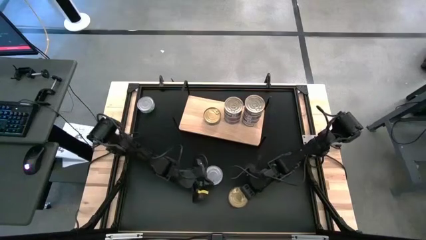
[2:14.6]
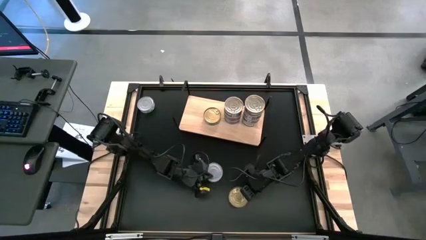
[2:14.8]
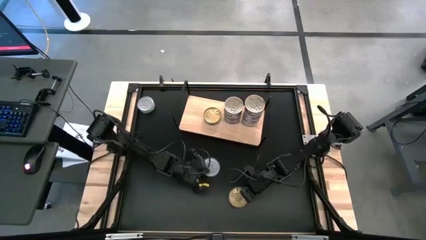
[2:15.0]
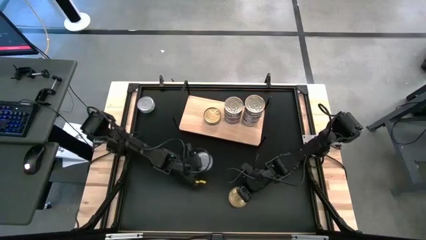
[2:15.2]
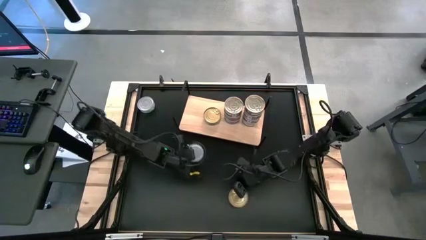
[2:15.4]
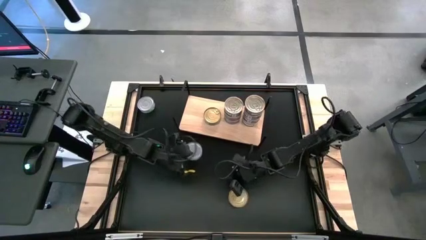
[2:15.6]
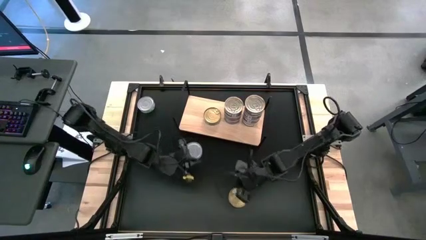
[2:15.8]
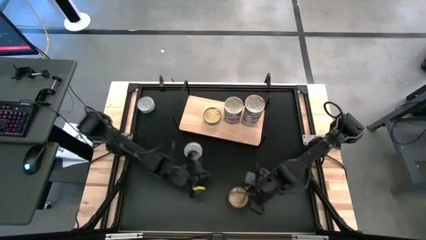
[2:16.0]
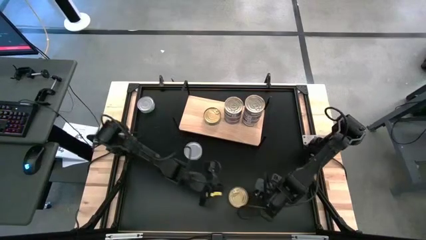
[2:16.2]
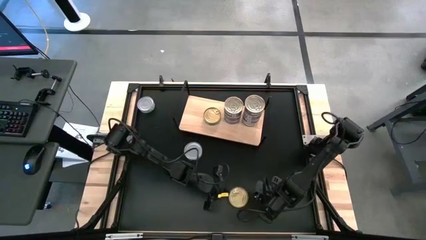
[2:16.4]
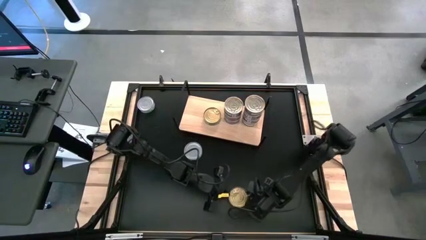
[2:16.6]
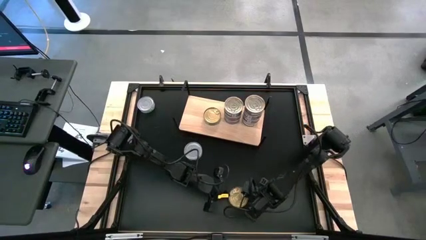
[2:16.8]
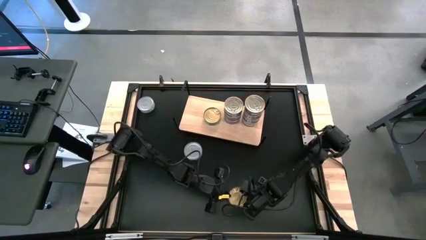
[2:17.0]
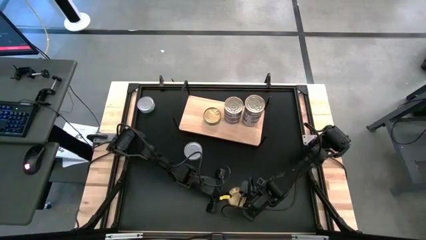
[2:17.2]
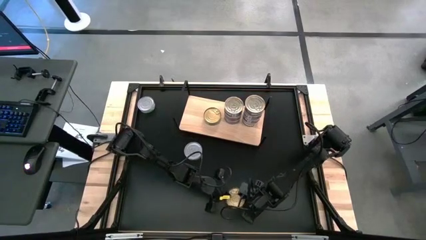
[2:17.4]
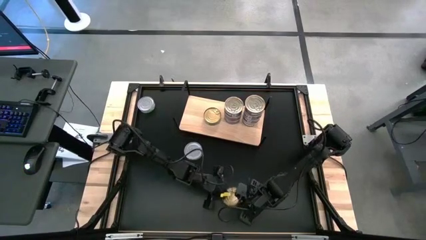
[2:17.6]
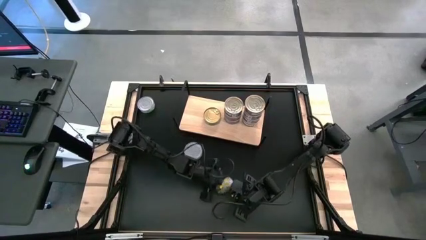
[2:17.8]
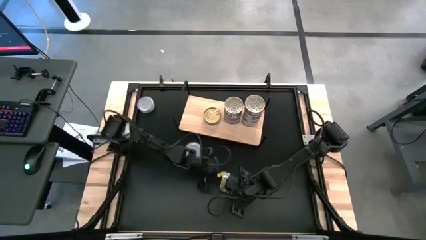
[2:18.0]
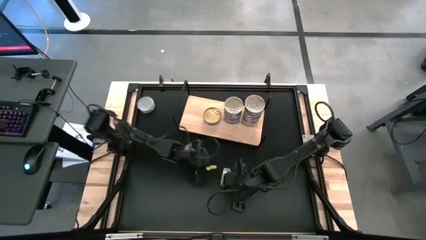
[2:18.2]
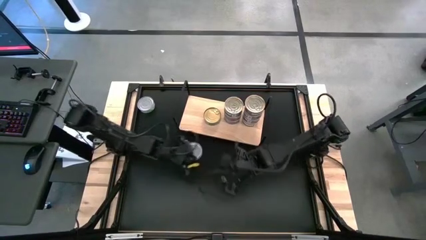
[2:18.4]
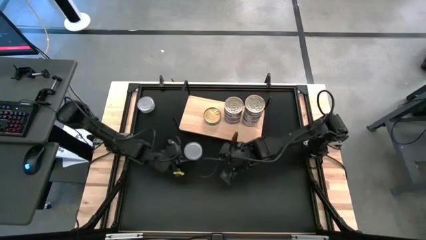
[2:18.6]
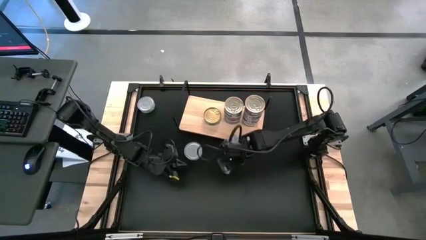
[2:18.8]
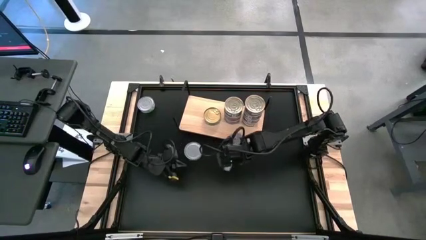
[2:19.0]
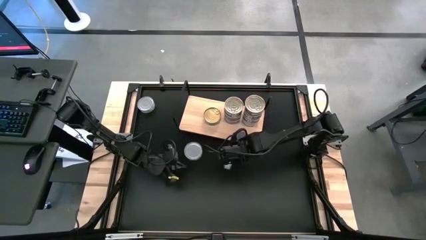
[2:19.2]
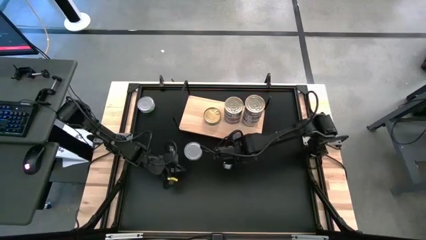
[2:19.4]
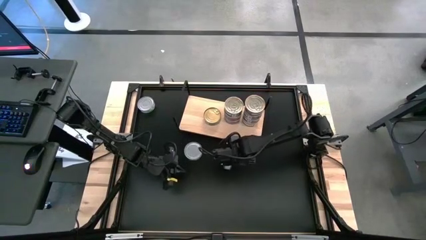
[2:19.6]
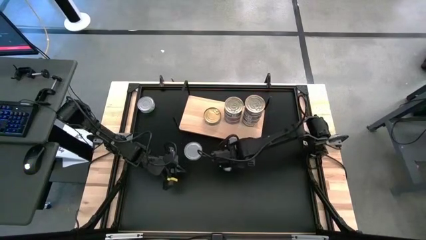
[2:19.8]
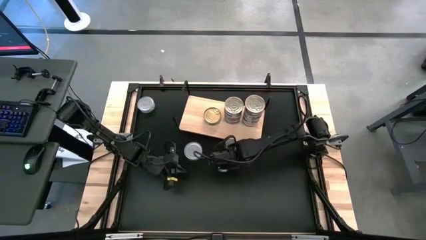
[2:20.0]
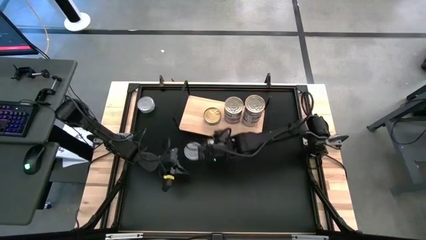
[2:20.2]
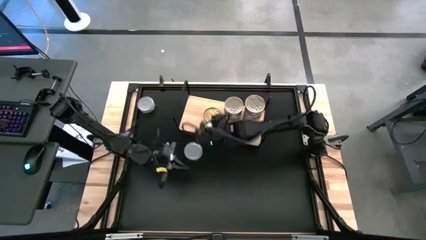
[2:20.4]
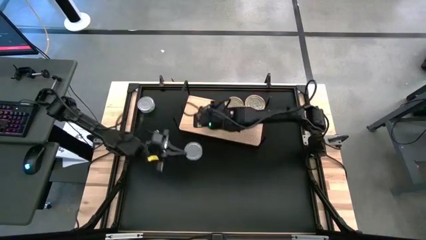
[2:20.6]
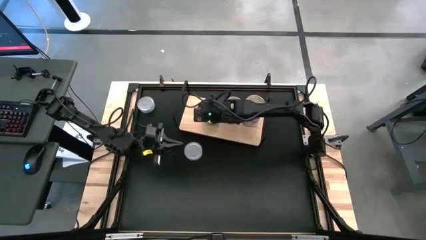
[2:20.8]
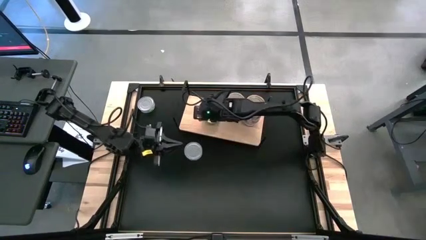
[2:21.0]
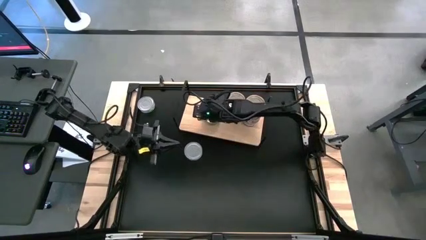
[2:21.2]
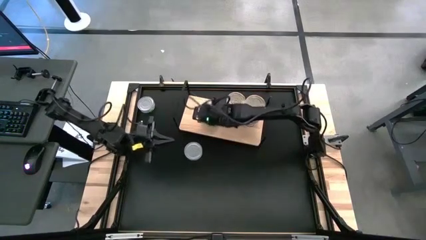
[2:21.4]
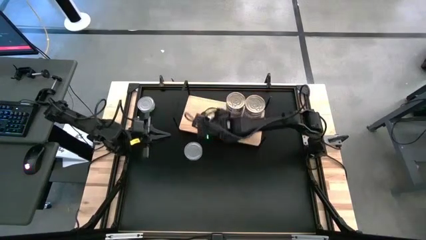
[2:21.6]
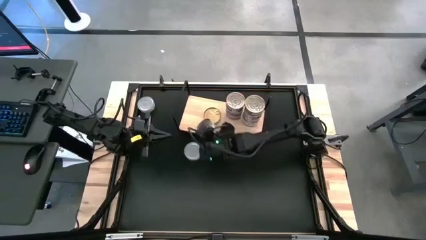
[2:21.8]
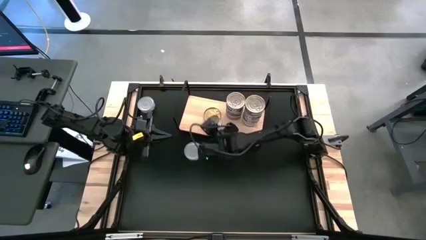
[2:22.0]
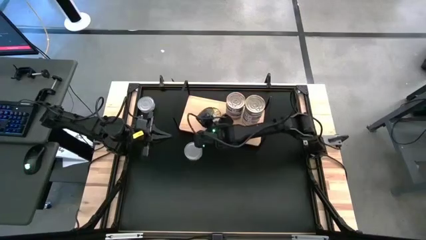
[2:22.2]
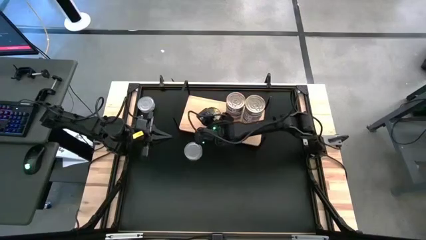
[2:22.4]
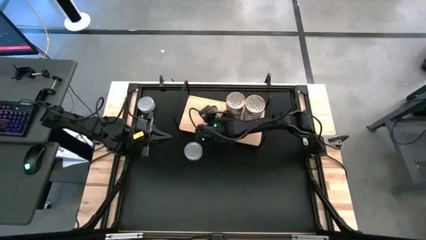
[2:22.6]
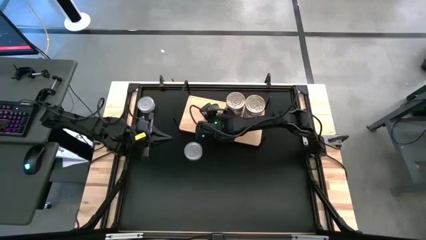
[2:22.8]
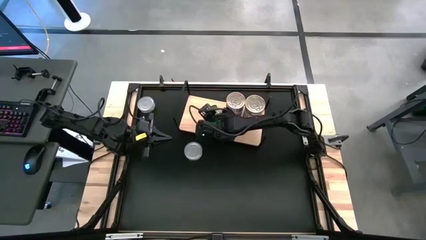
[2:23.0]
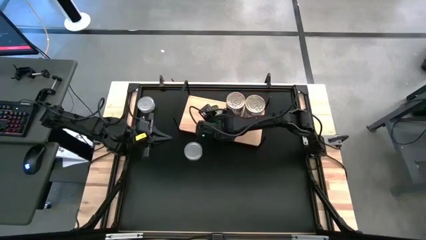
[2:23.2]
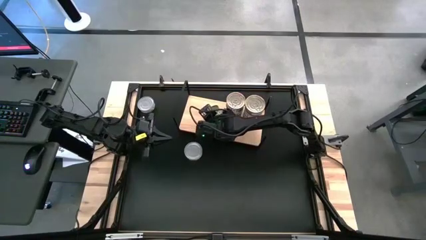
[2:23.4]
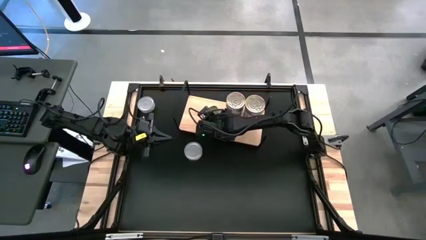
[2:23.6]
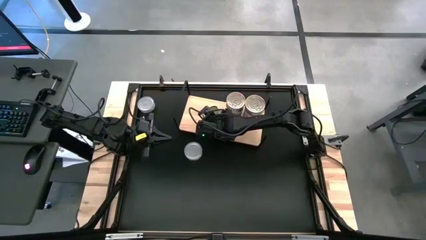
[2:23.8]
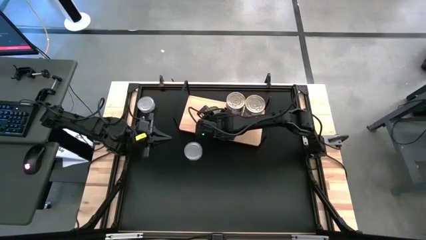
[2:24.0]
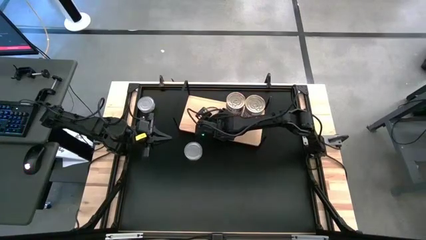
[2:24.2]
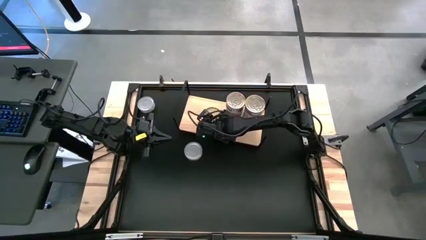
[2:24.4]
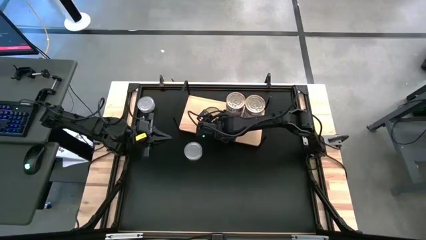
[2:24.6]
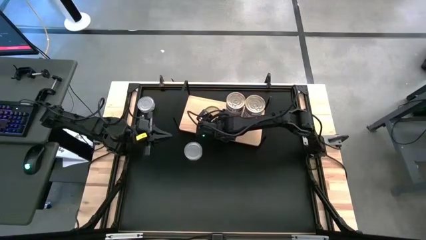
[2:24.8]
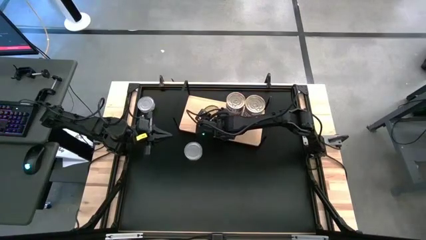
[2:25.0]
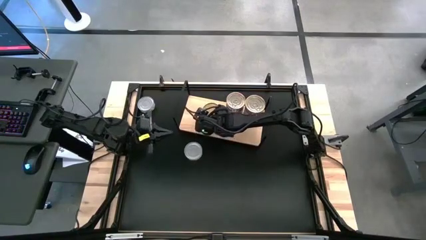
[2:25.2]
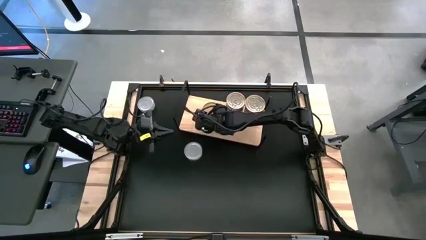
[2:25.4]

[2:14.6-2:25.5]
Task: Stack canned seafood by type on shelf
Stack the green tuna can on top of the other green tuna can on the shelf

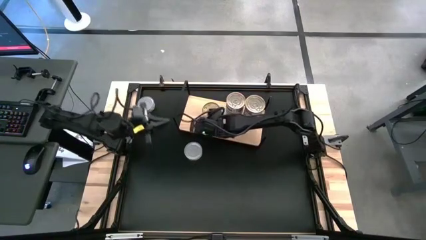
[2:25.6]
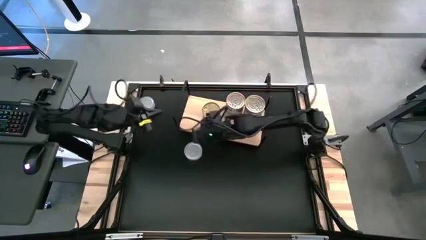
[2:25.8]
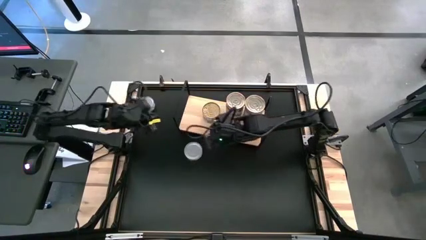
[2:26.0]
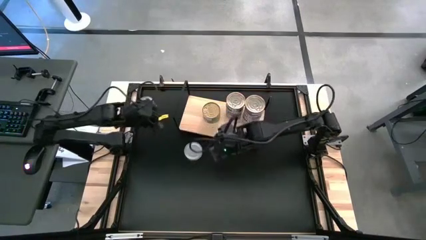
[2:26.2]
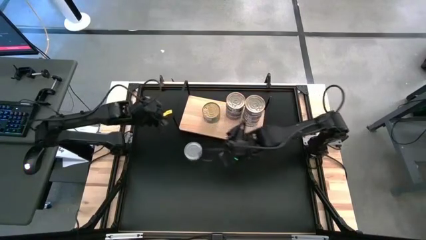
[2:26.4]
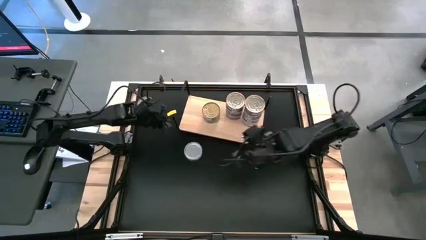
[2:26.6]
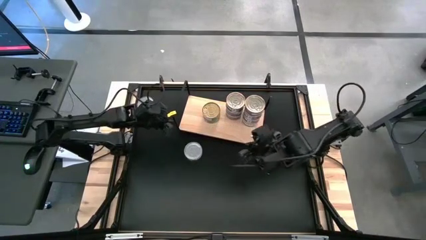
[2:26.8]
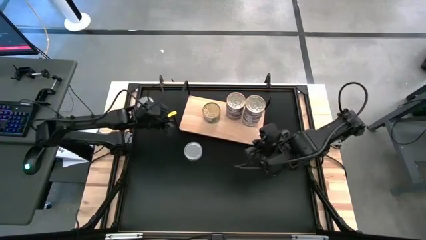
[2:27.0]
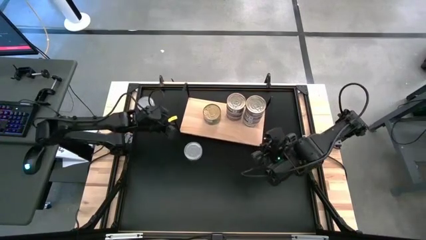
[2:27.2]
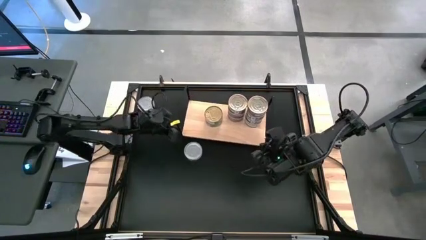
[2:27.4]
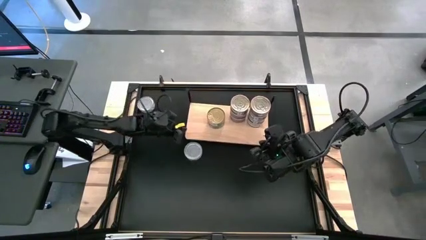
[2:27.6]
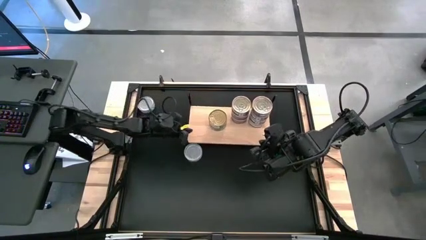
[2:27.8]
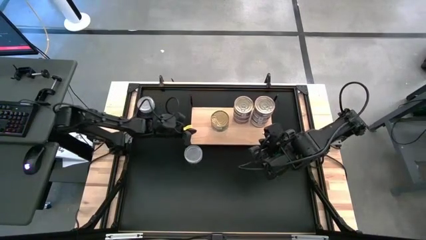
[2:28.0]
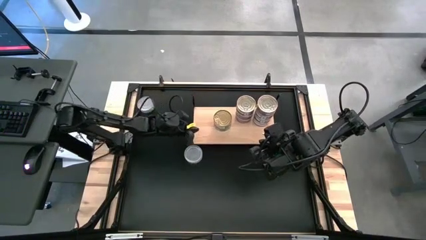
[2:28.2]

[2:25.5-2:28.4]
Adjust the shelf

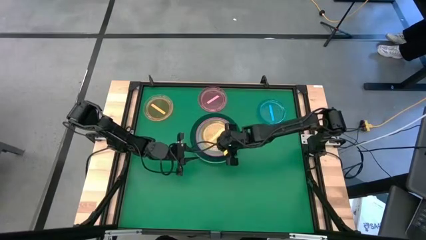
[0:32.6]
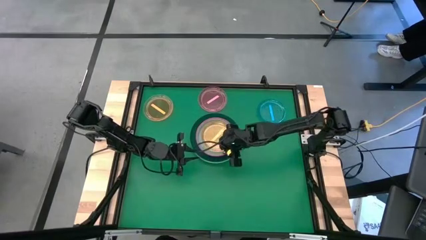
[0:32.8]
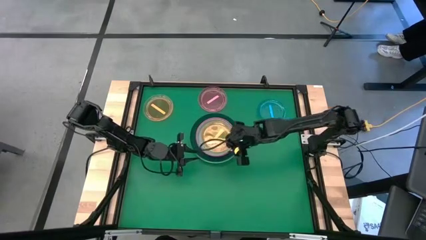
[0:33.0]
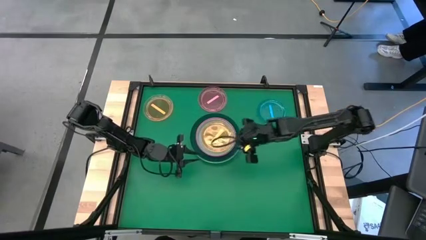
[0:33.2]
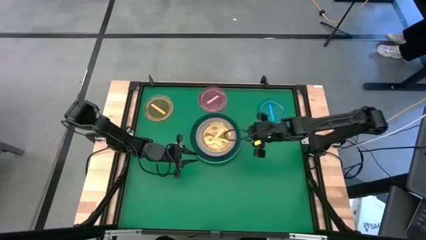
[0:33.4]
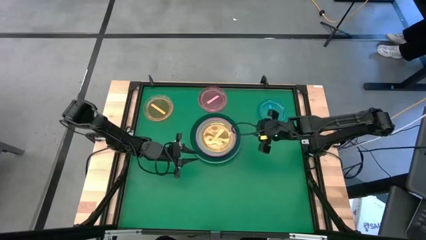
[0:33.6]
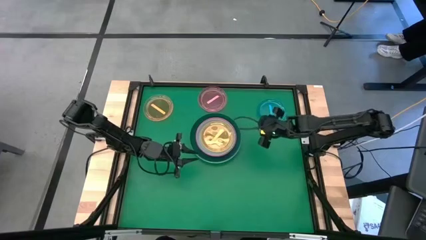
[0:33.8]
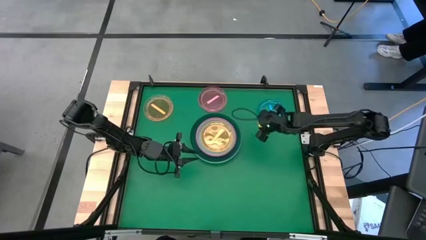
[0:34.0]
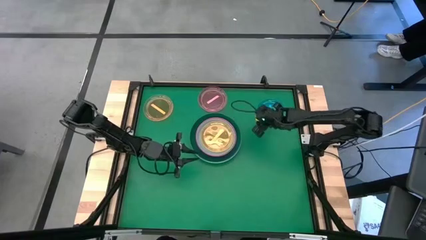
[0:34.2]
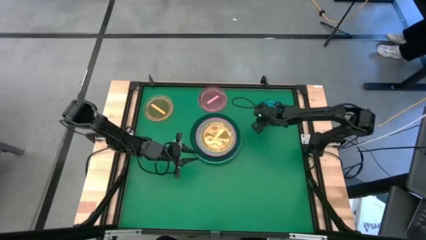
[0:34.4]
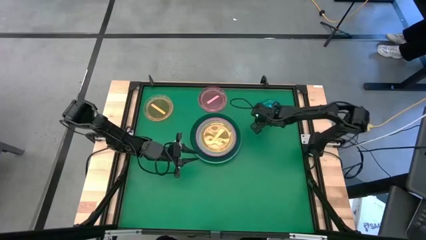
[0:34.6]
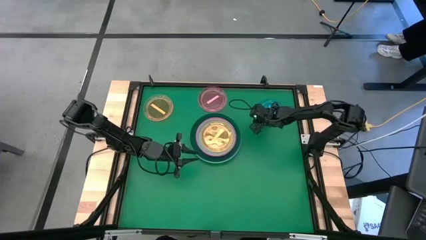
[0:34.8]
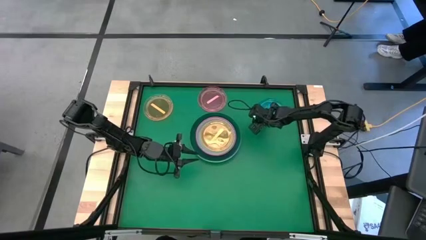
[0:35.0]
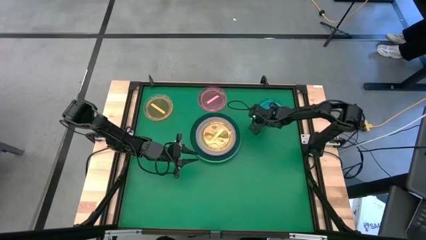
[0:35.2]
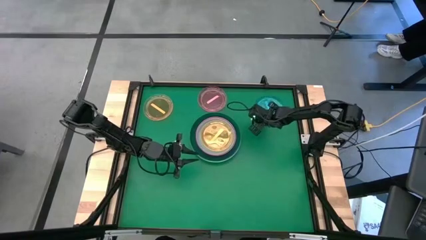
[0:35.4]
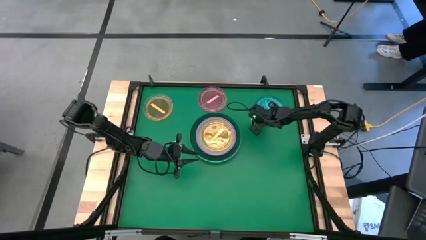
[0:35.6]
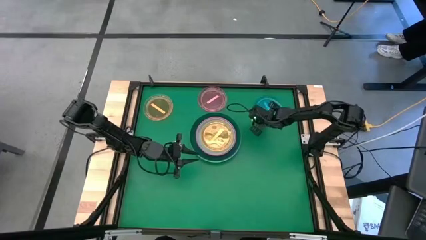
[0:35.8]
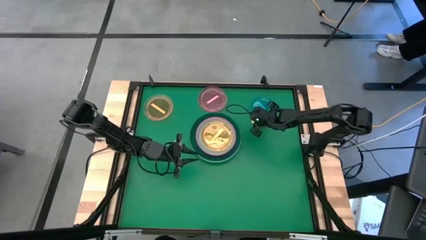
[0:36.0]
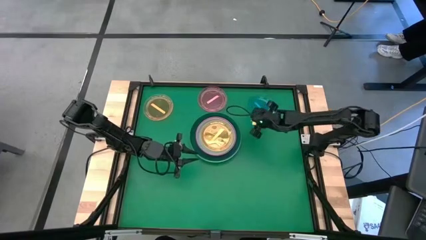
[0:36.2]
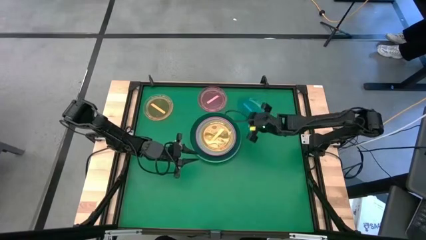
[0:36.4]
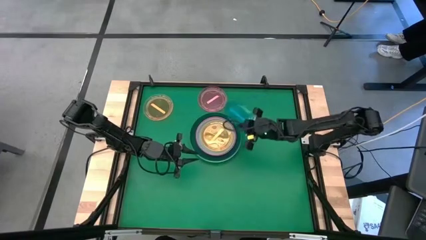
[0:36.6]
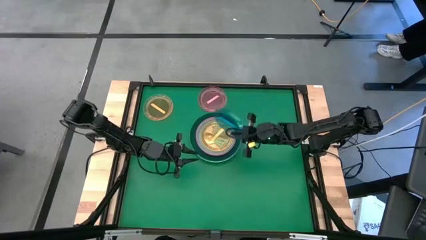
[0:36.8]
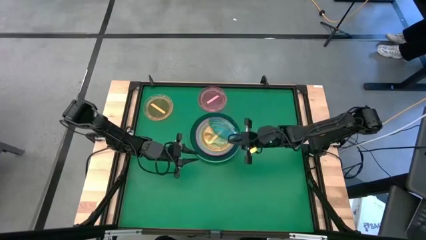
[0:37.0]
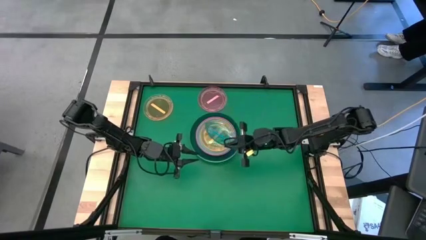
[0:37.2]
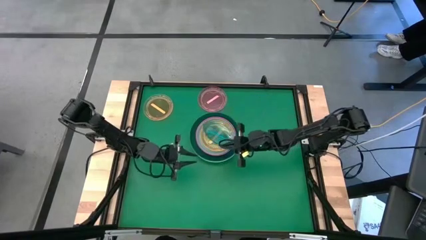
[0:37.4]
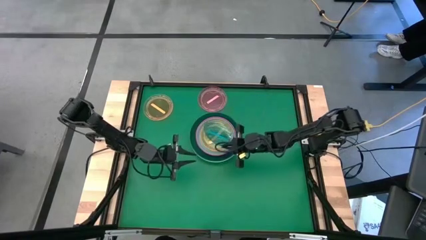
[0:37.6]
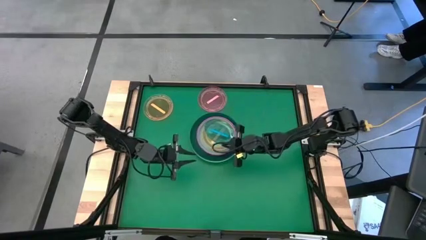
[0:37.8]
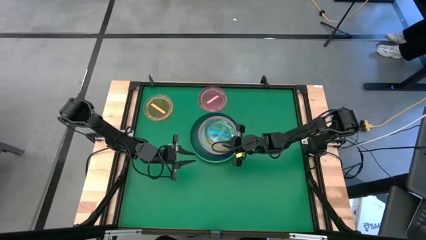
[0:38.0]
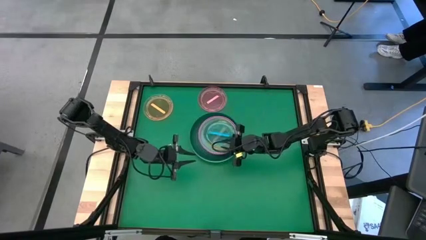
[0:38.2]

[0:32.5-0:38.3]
Task: Stack plastic plates
Stack the blue transparent plate on the yellow transparent plate
